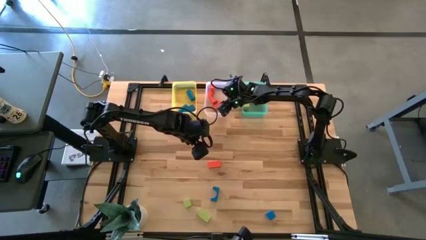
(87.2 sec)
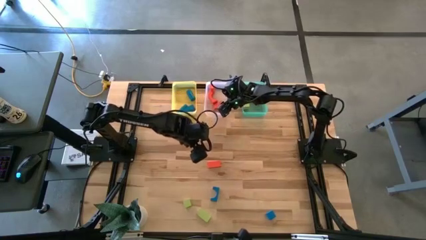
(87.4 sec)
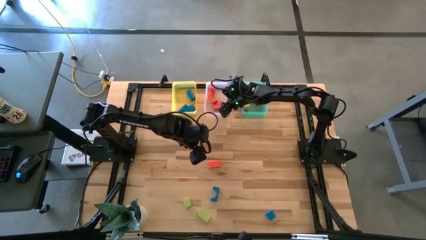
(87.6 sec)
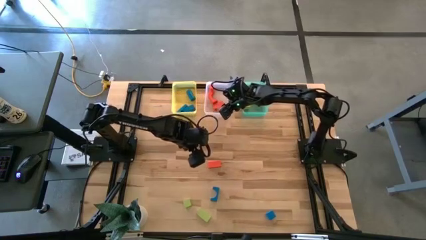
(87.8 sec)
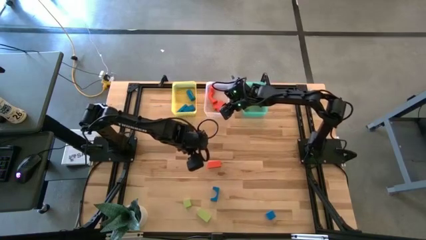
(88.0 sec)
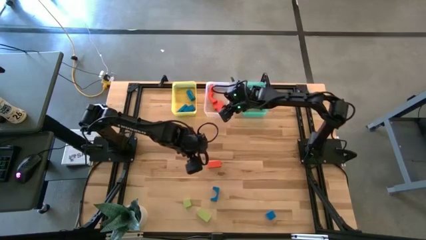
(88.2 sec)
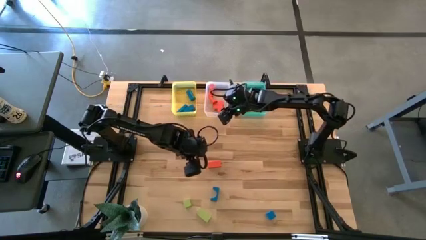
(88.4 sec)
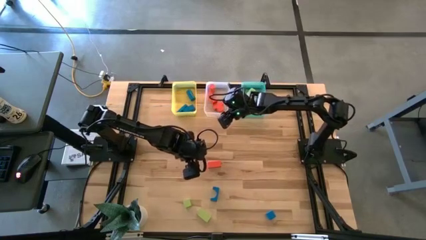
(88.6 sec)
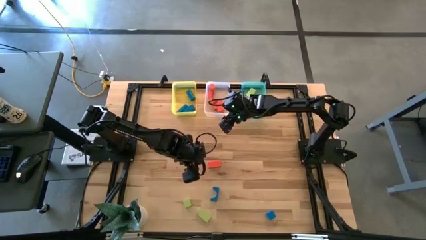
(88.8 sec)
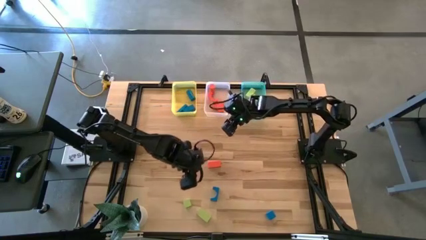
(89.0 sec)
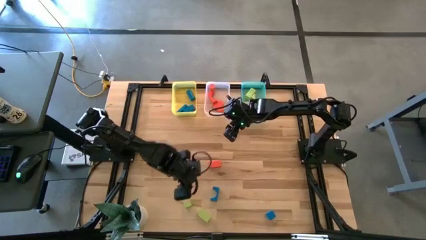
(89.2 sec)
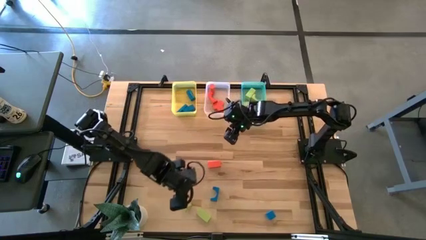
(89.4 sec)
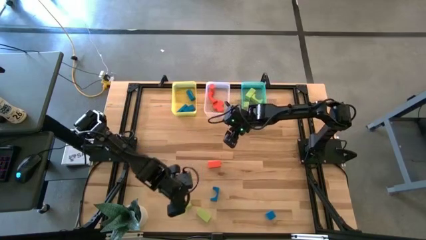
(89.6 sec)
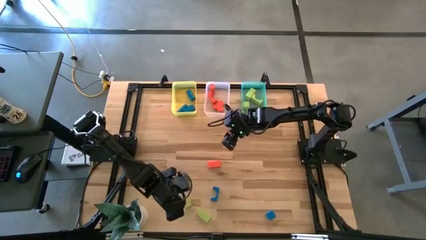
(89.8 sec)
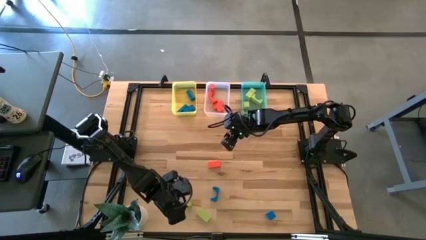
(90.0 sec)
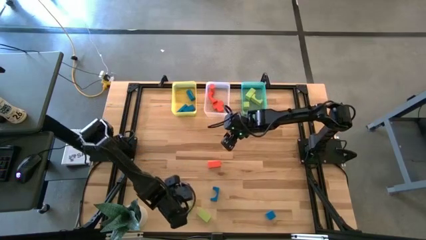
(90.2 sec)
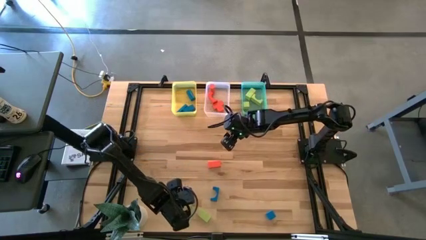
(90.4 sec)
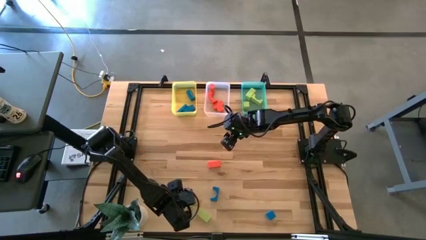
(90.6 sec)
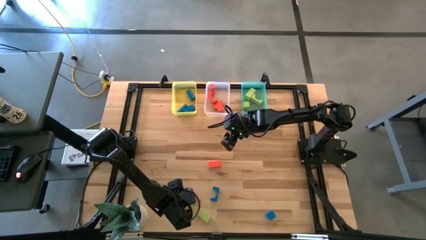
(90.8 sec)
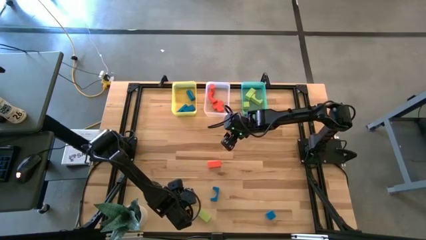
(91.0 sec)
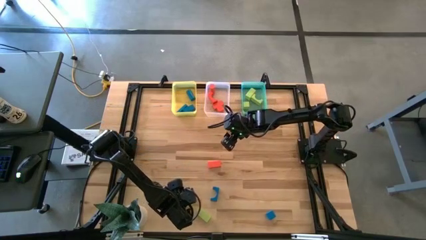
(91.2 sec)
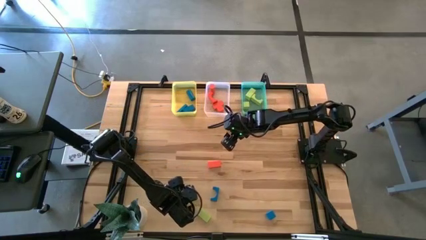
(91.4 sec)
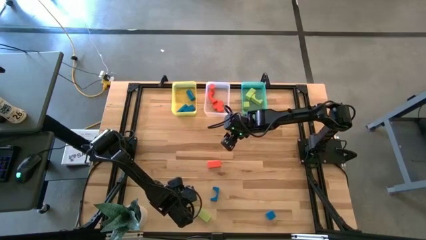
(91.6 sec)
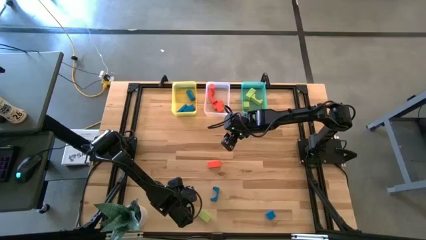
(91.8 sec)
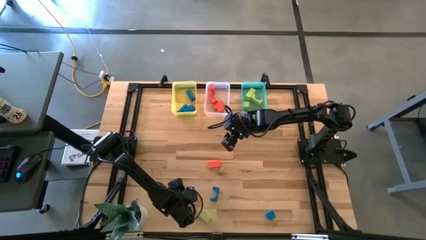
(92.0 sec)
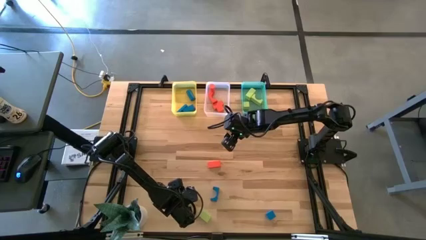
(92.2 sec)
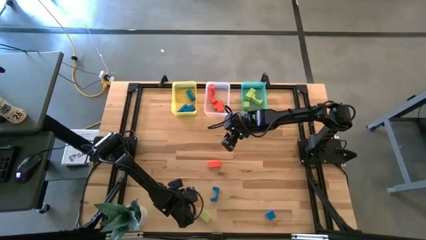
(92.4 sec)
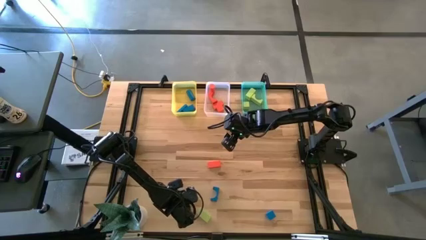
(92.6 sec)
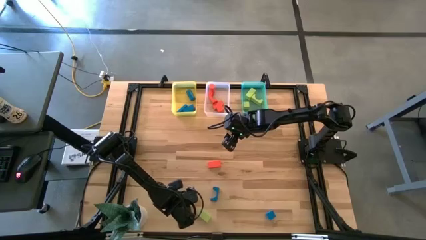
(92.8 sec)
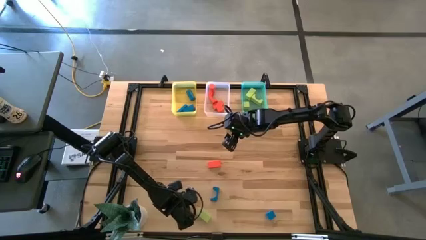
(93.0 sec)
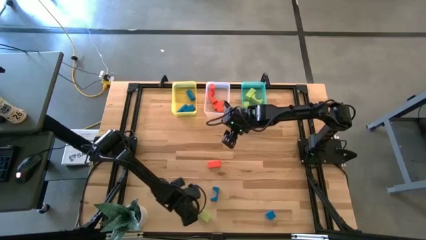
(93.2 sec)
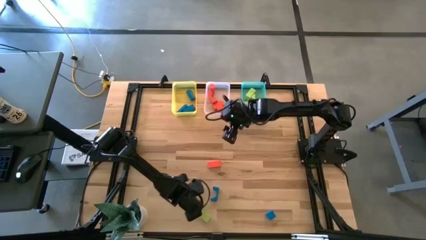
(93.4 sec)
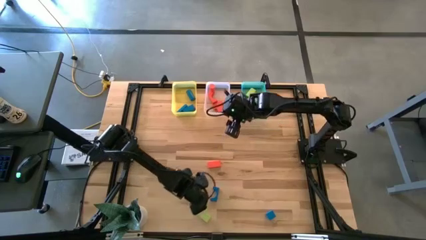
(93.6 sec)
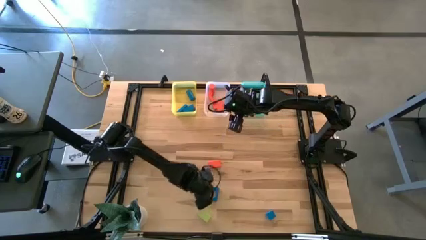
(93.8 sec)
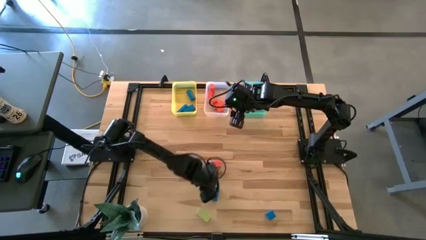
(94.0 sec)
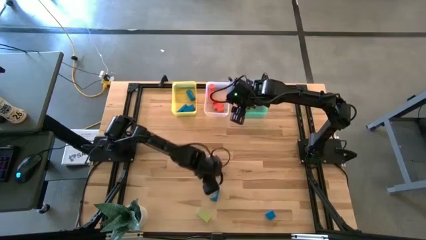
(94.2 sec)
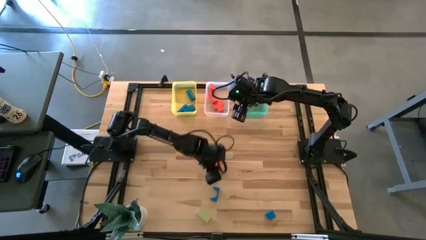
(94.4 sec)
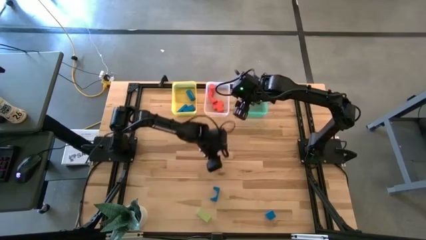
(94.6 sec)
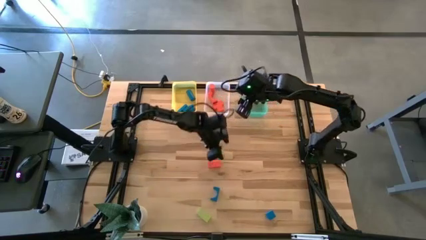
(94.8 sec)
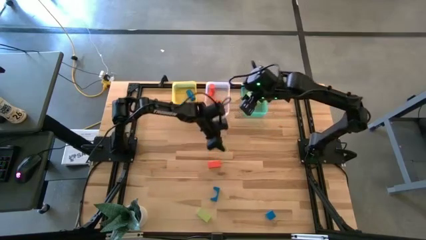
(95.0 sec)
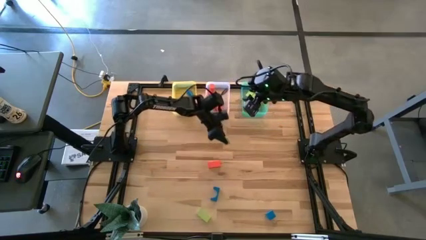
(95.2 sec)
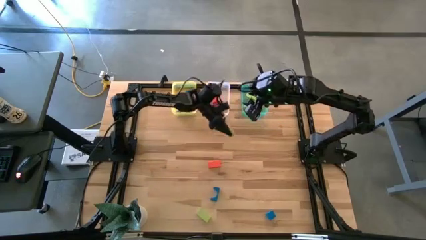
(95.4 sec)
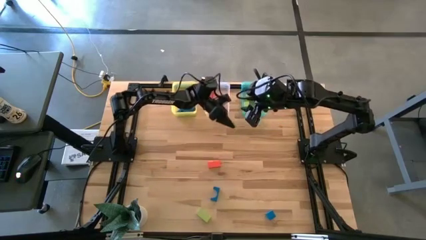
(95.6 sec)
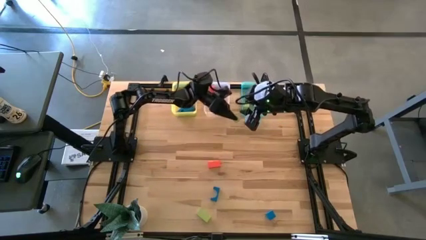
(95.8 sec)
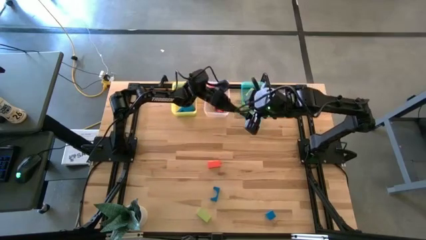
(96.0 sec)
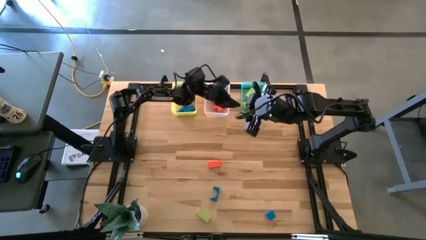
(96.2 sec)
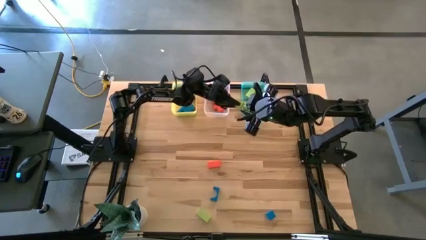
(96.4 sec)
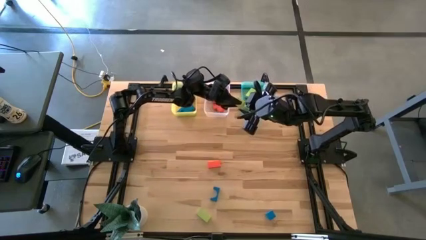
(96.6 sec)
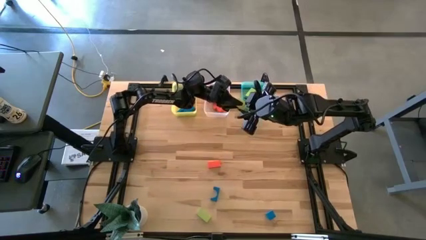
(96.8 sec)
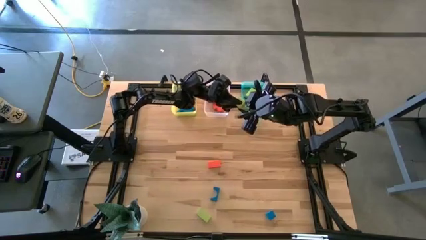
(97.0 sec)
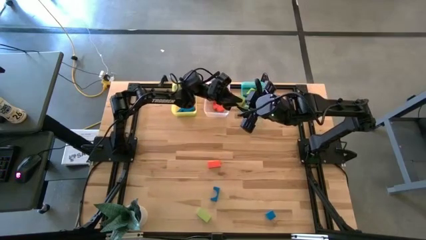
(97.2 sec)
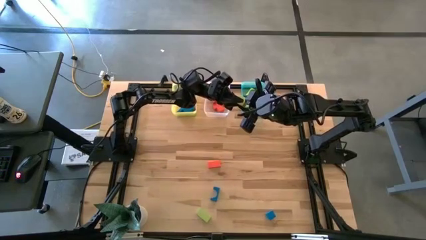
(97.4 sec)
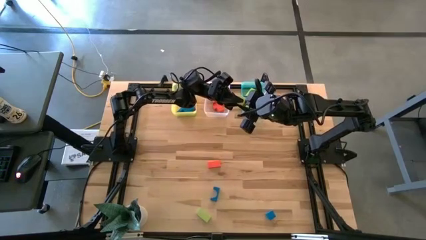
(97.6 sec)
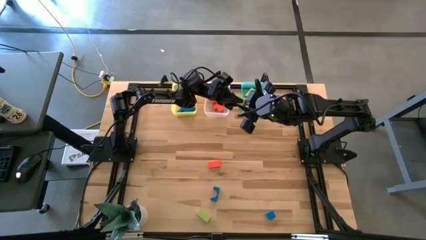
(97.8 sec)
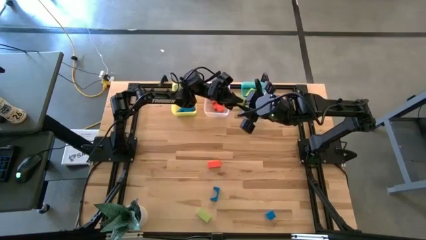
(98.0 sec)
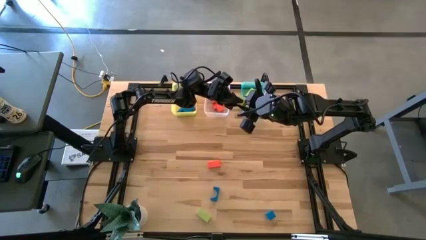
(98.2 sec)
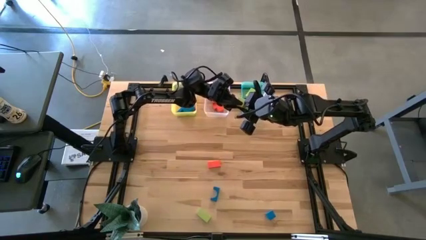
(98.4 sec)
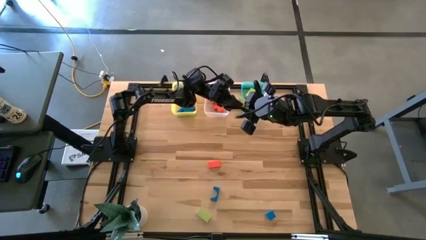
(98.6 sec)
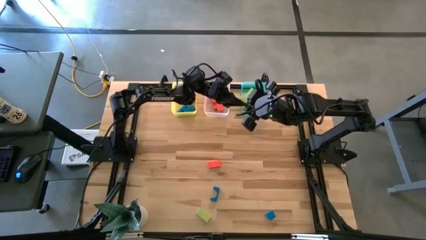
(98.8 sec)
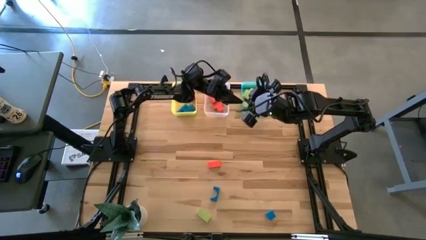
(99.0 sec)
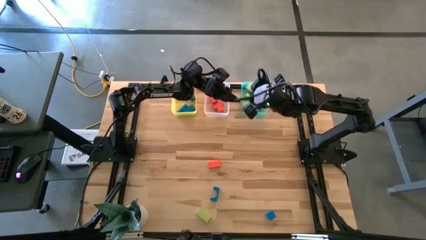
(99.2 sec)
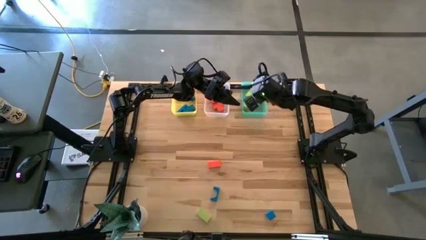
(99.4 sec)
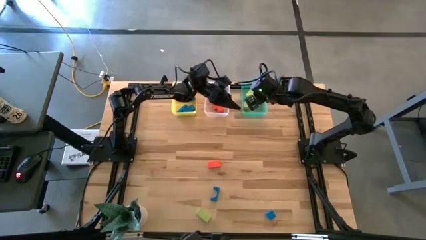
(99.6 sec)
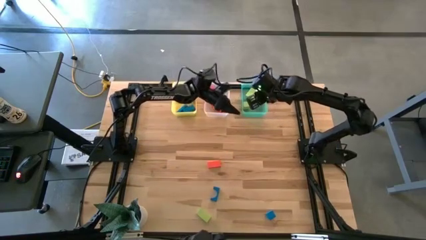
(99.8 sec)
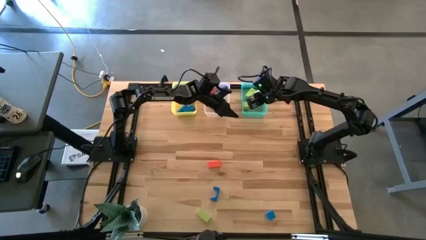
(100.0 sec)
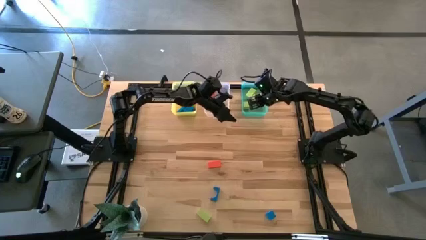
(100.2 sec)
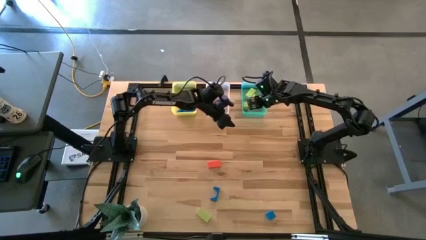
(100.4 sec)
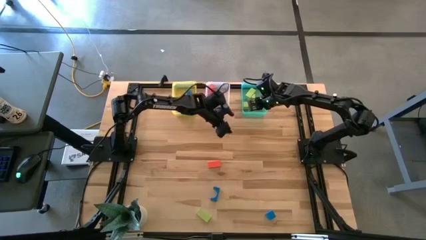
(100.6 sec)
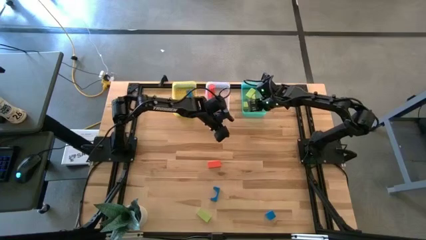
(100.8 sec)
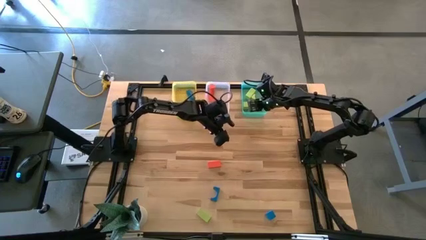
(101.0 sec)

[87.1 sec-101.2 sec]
Task: Sort & place blocks by color
Put the green block into the blue bin

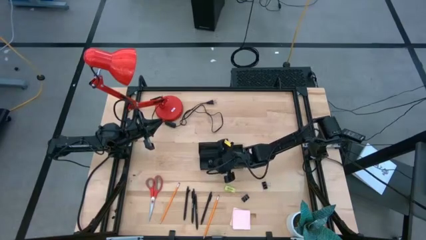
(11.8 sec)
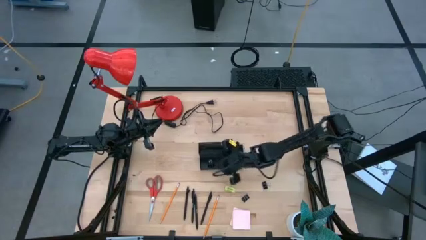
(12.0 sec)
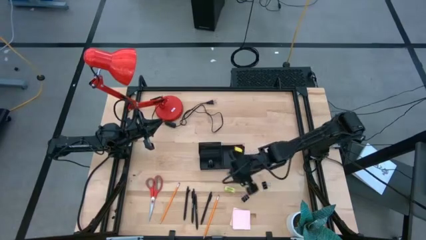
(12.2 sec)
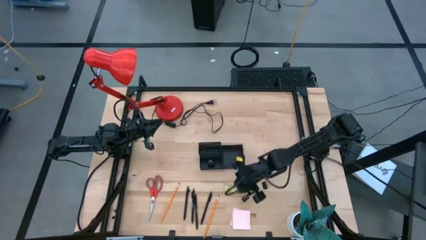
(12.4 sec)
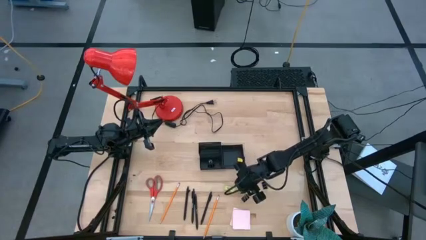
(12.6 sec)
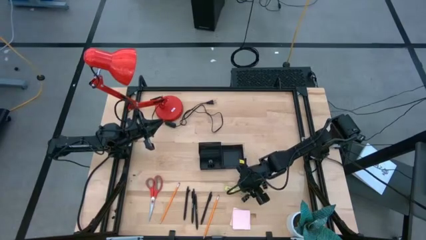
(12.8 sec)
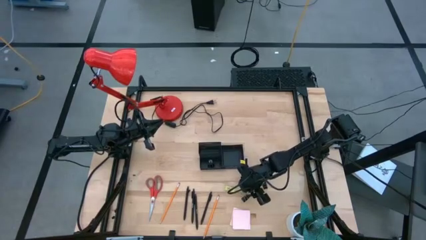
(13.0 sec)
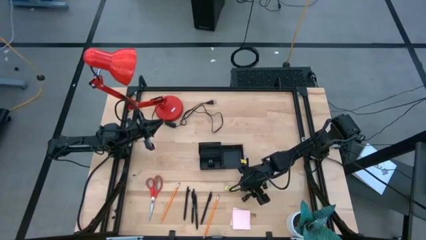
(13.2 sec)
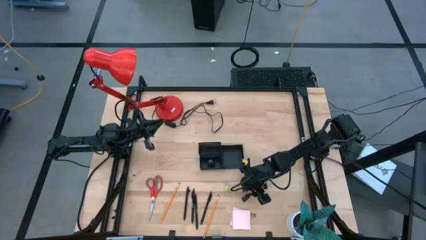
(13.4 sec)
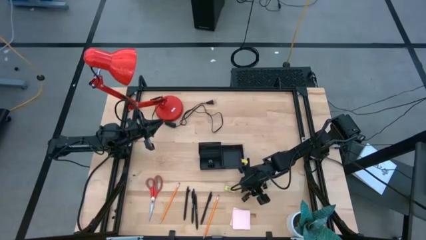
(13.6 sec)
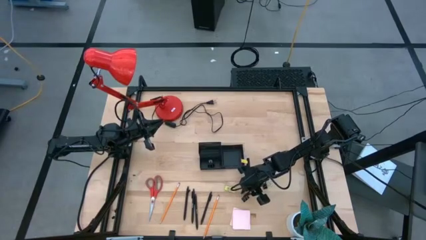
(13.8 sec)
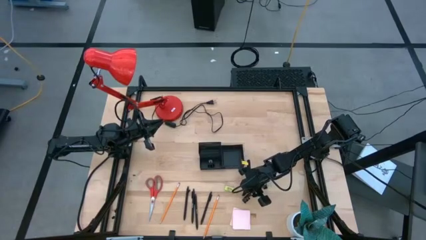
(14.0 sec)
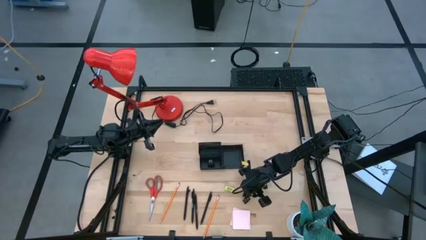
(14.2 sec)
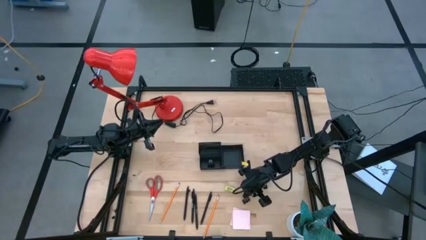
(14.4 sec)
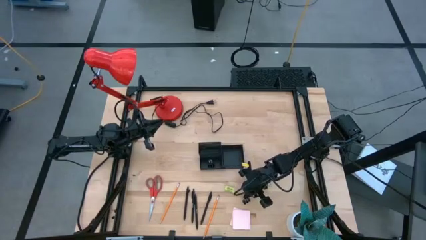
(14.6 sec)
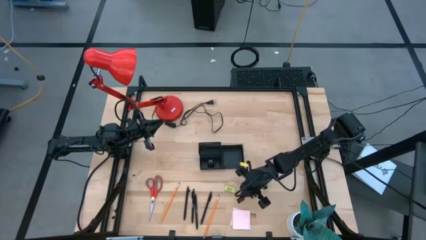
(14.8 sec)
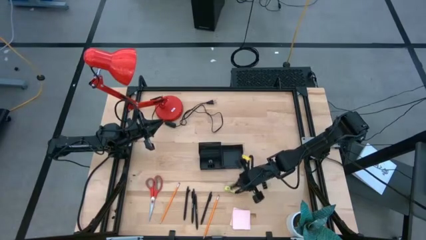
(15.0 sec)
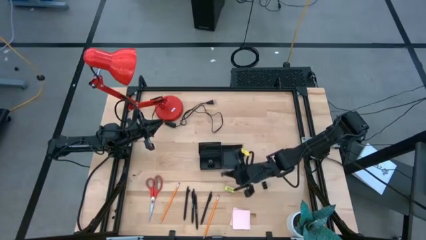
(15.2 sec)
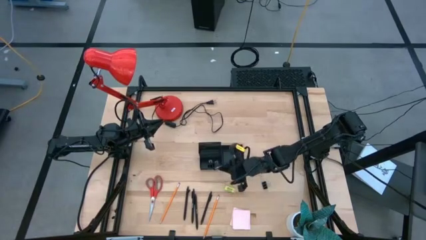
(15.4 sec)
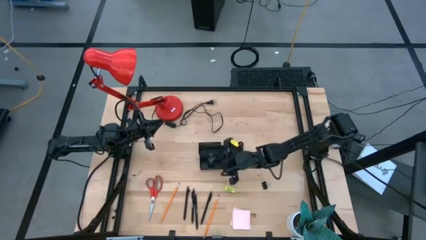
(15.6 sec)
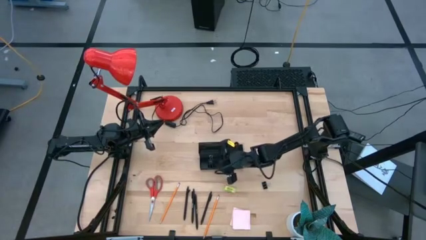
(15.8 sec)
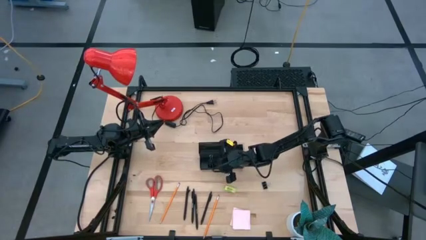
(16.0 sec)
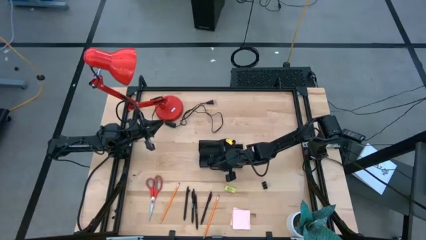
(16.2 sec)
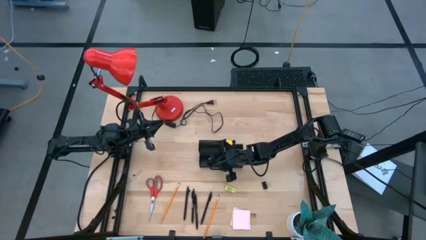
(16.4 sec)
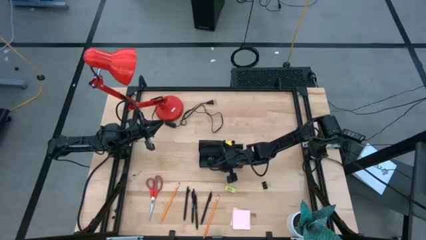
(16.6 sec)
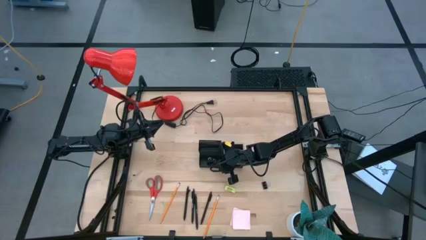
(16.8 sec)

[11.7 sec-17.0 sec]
Task: Pick and place office supplies into organizer
Put the black binder clip into the desk organizer
